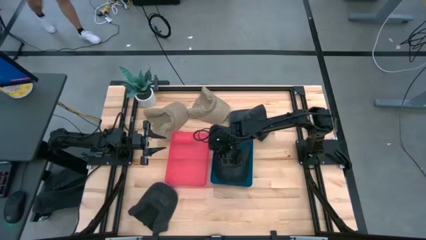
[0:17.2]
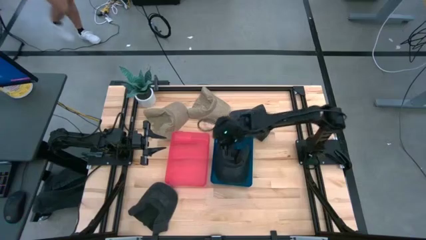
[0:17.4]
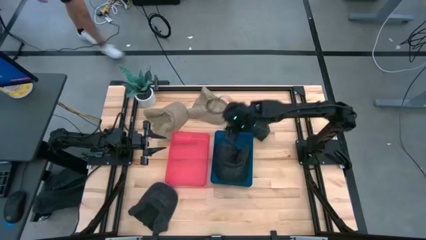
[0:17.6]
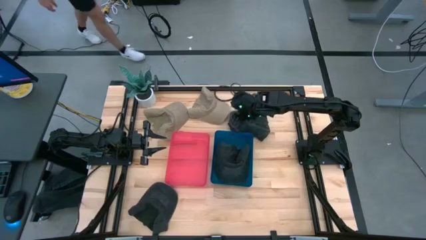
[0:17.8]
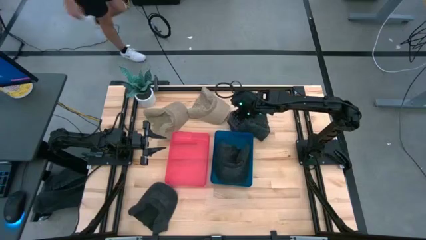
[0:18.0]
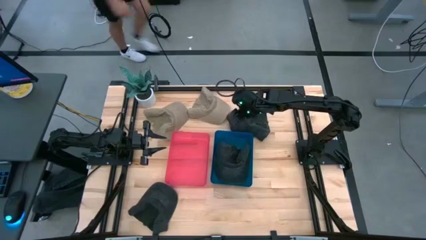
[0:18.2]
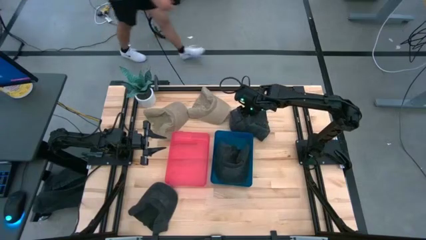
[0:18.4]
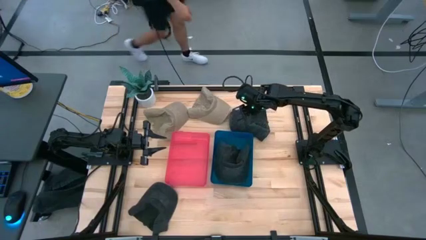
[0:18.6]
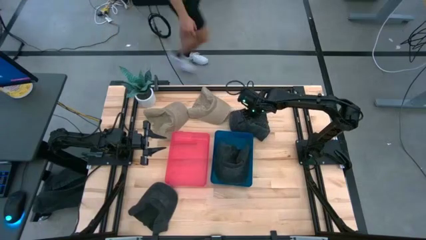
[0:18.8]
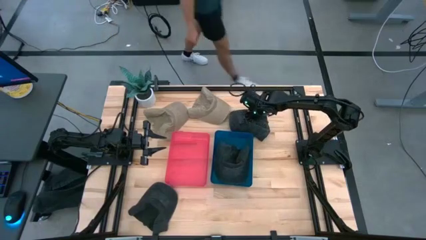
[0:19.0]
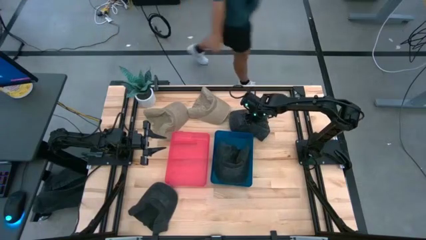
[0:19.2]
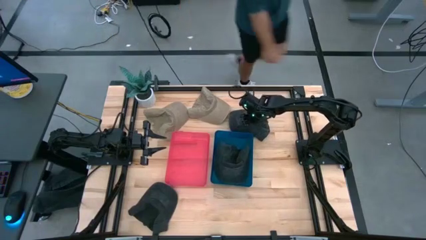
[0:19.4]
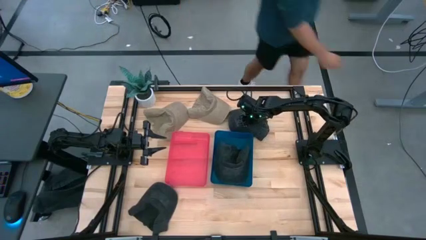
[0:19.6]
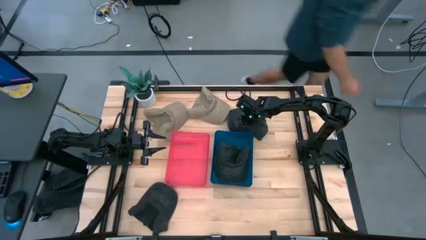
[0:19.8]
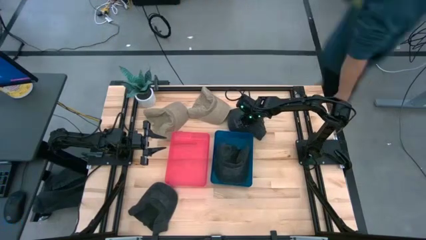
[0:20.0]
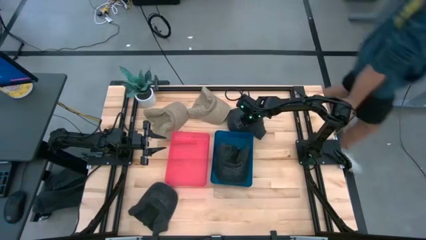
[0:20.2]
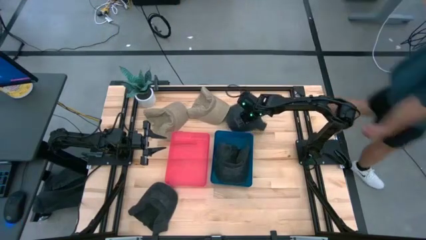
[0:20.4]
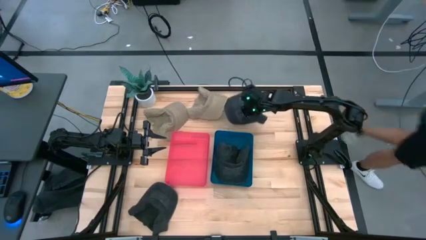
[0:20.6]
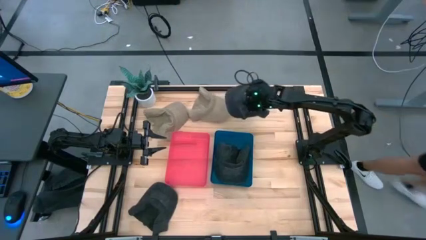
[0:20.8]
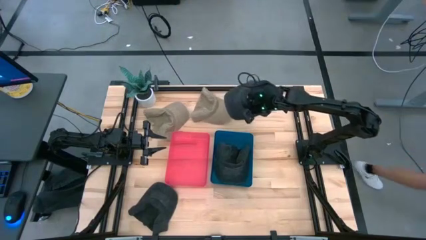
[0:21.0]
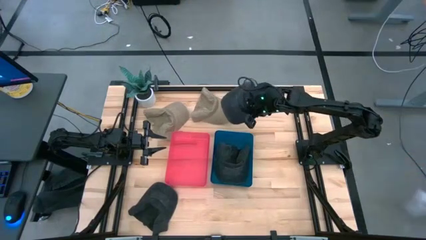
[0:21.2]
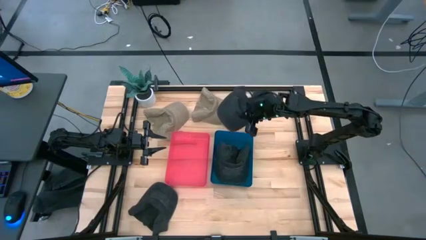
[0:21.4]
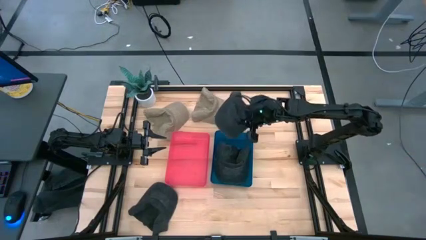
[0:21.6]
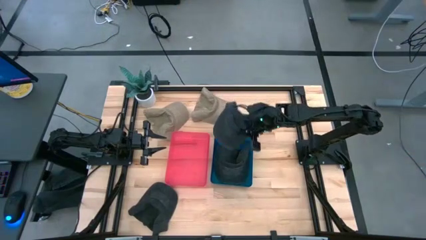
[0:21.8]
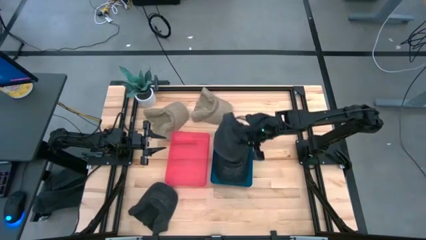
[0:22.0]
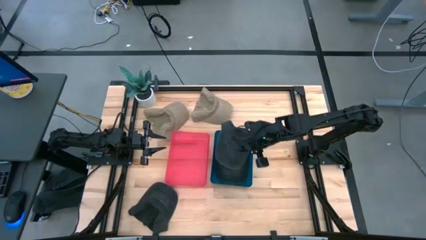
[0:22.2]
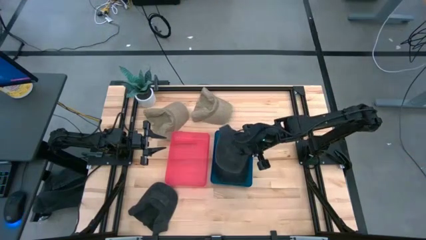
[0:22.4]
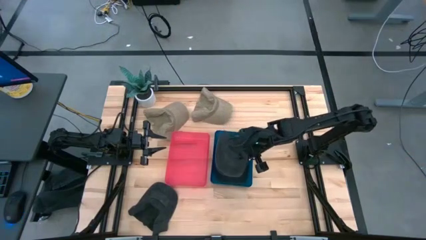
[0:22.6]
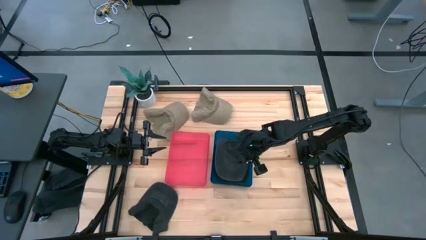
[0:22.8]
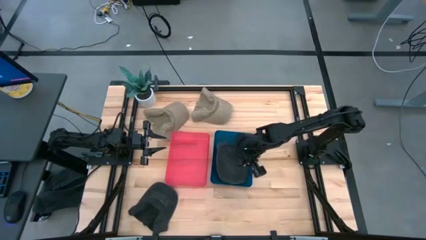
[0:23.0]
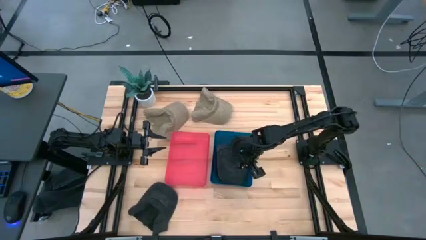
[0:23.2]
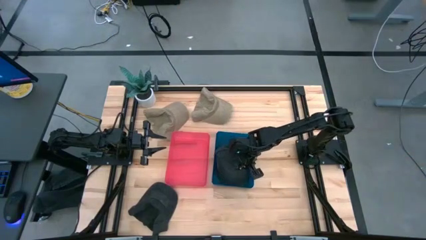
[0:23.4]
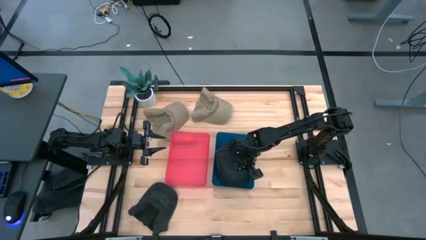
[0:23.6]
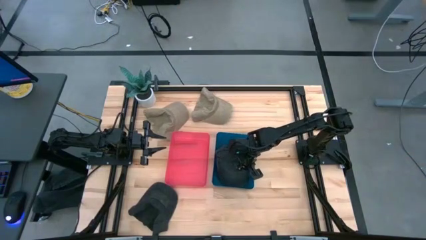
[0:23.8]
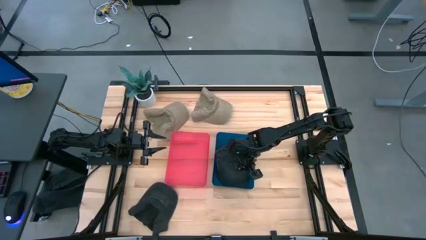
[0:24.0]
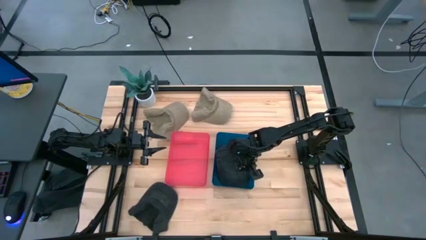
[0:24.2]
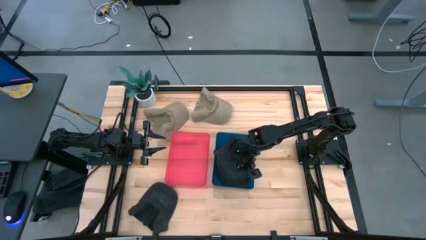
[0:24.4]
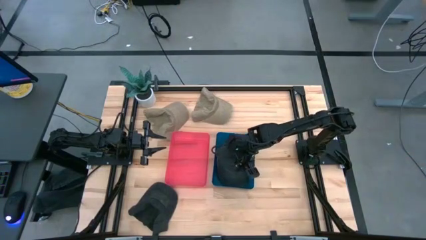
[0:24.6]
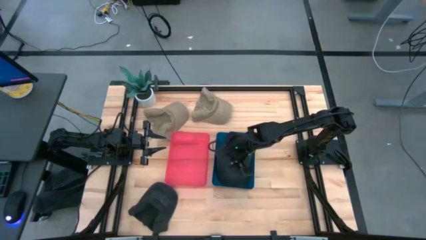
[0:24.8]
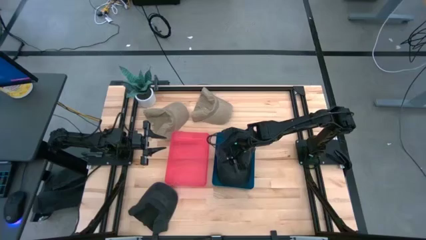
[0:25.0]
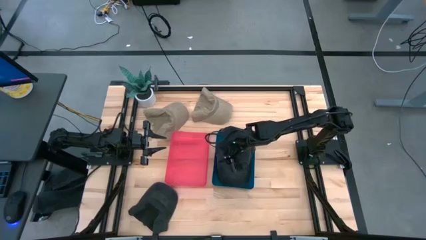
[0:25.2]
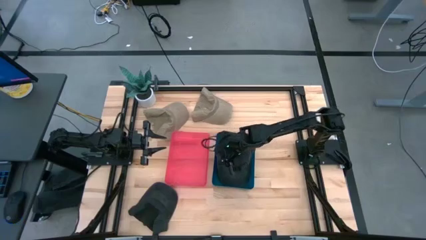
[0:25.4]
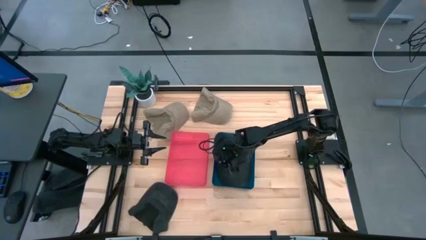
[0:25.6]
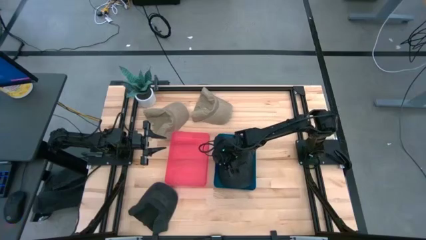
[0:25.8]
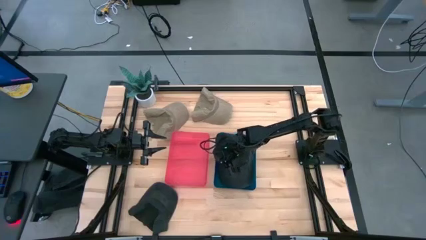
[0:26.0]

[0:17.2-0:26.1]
Task: Pick & Place hat
Put the top black cap into the blue bin

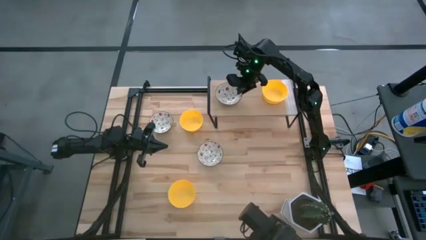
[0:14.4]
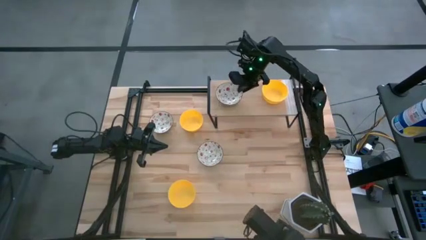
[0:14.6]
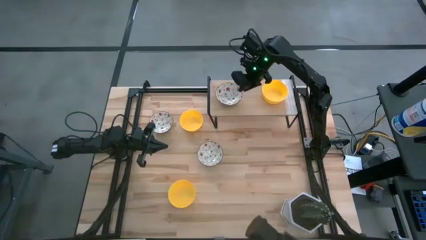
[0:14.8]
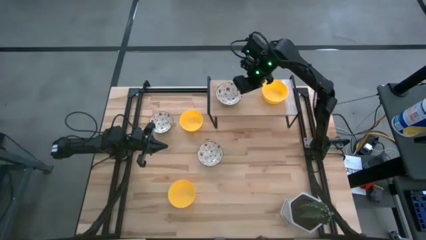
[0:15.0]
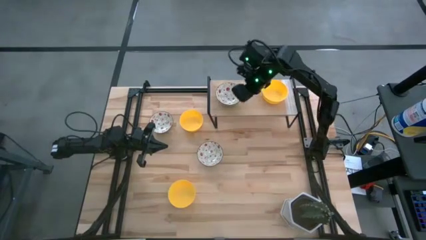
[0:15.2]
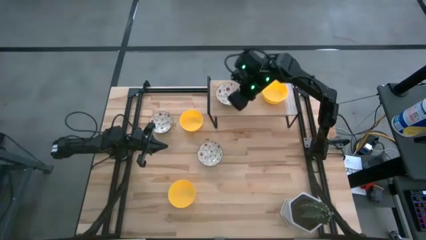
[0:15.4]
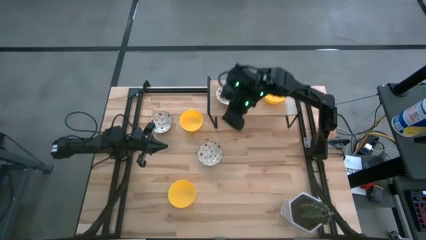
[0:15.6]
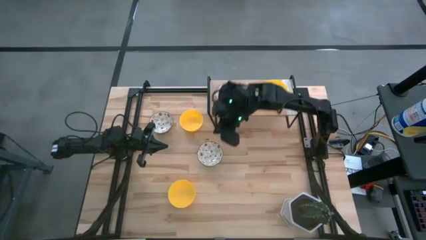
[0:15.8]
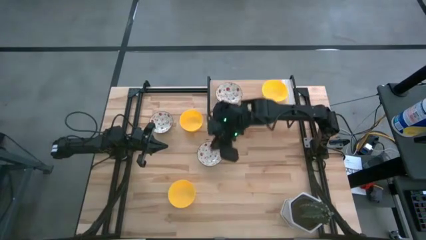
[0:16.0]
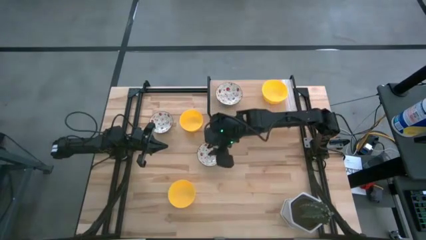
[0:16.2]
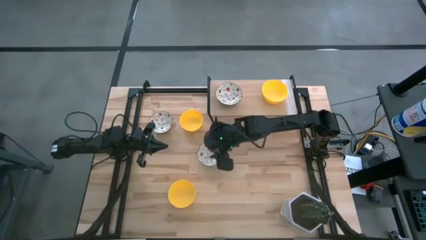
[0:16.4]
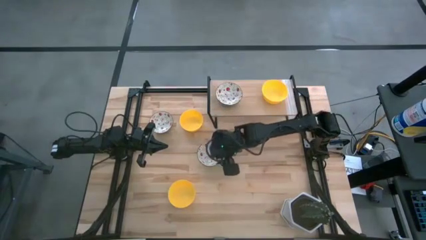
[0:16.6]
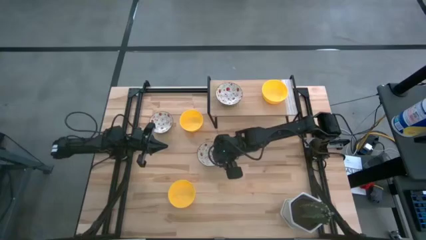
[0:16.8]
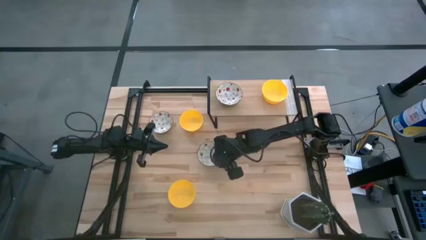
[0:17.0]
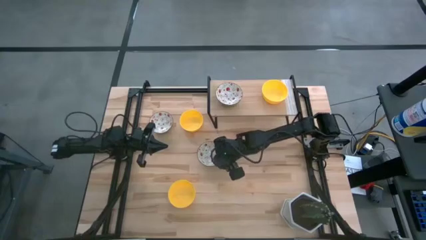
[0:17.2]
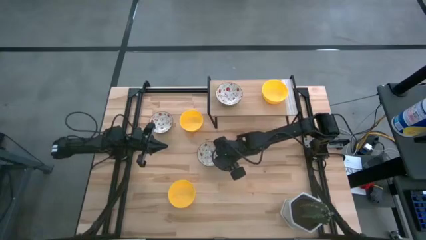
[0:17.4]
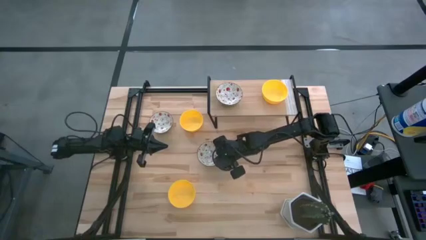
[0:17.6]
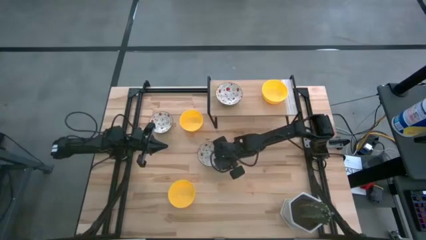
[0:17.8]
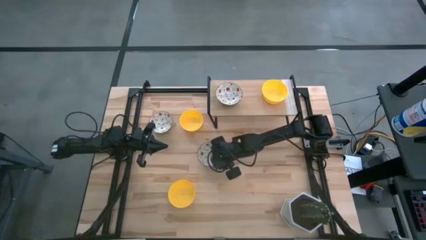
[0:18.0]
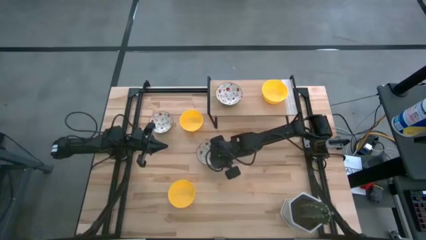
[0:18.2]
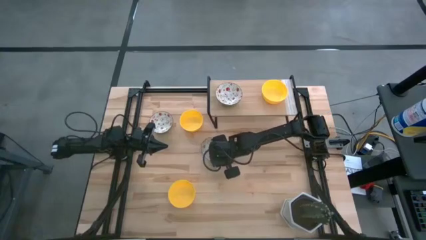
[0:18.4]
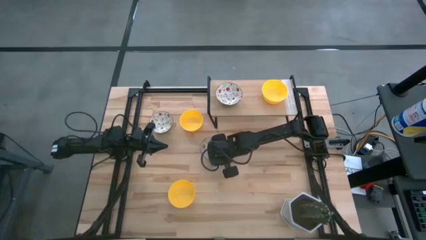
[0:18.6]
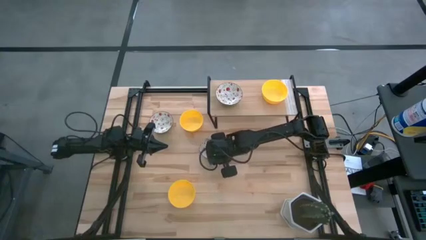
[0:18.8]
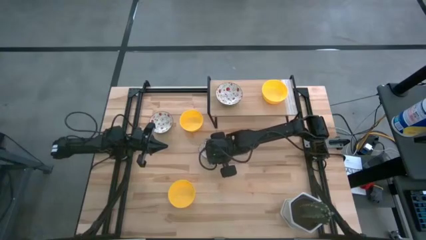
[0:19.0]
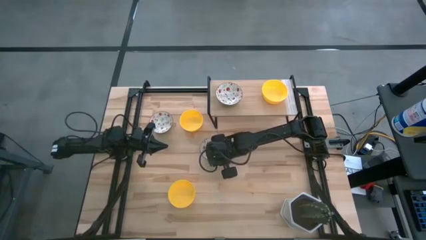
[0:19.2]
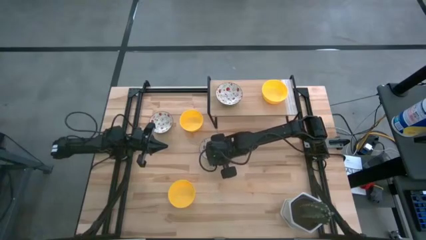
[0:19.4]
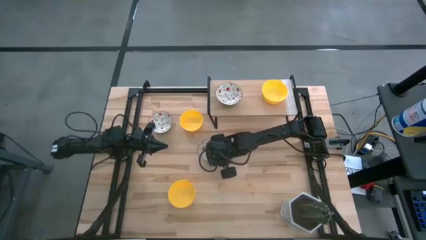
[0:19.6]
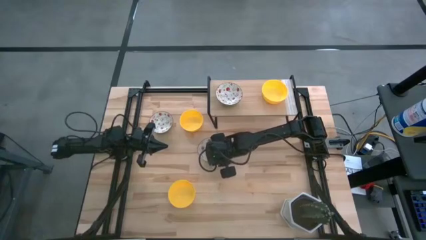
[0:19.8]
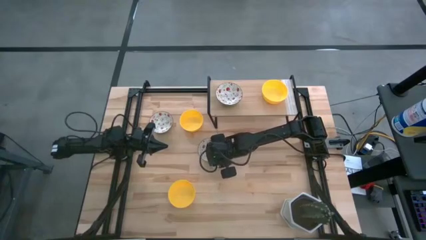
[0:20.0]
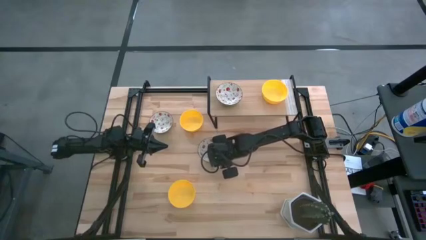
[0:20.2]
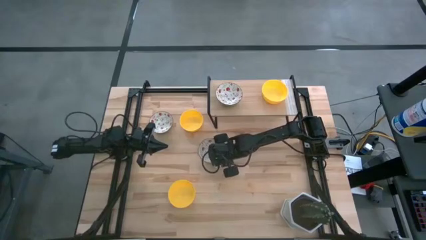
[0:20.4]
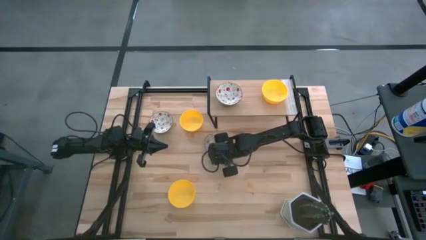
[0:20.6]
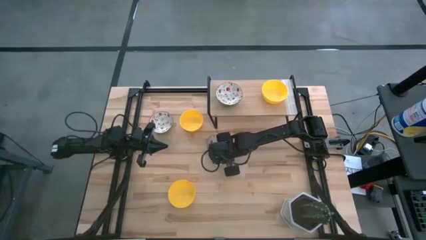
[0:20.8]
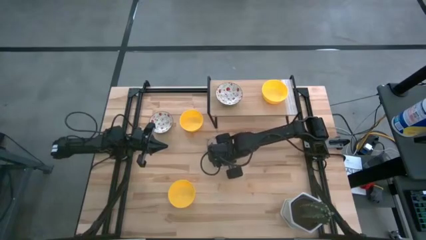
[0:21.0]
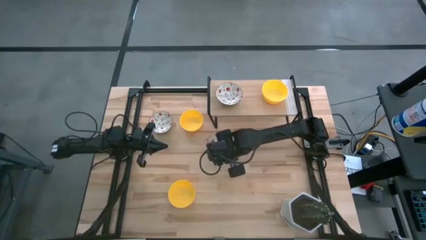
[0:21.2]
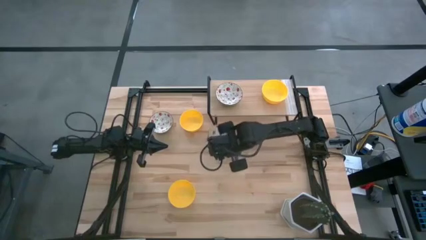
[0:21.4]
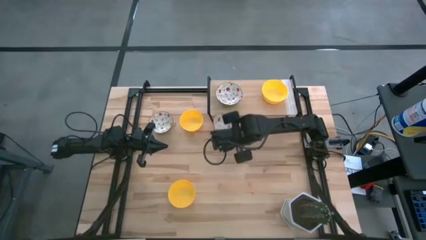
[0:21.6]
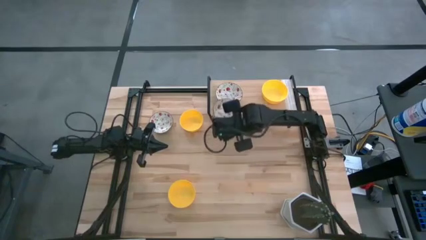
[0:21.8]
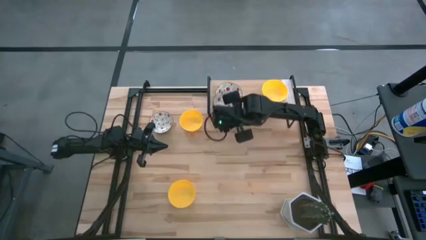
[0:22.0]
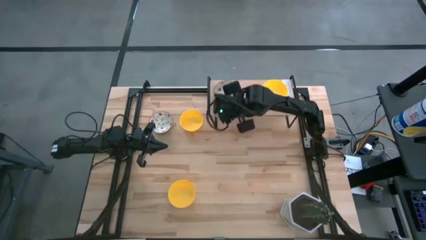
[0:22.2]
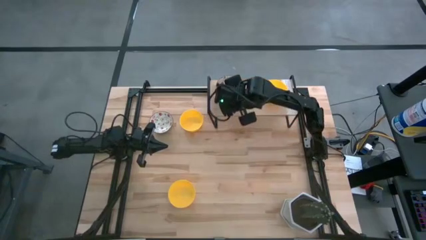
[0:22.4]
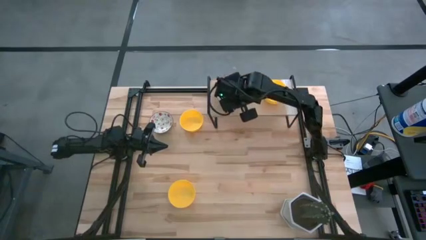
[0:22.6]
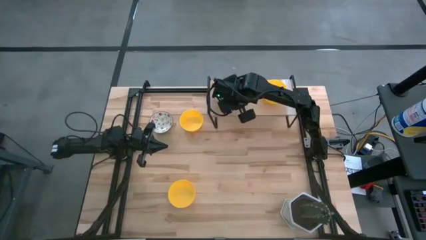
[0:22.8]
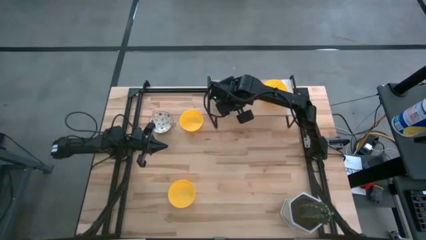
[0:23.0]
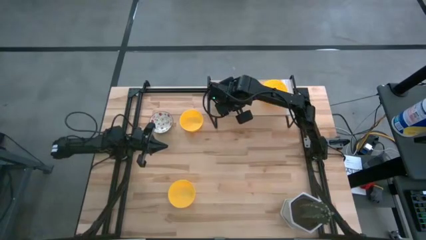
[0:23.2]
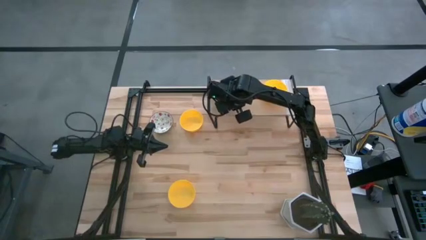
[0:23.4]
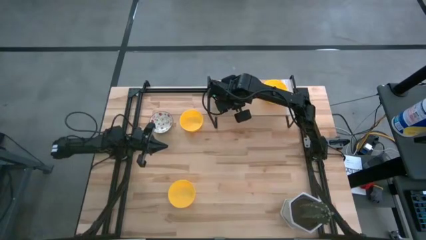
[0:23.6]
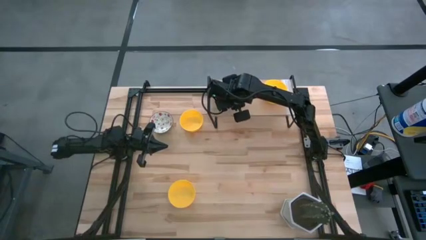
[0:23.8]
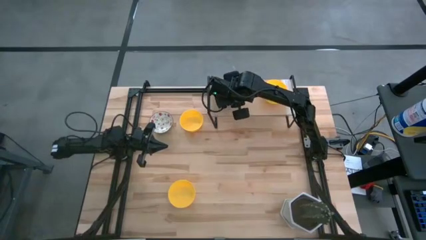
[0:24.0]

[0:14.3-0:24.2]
Task: Pick & Place Mini bowls
Stack the right green patterned bowl on the green patterned bowl on the shelf
